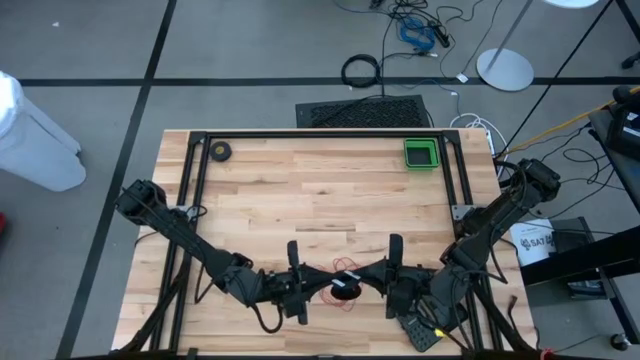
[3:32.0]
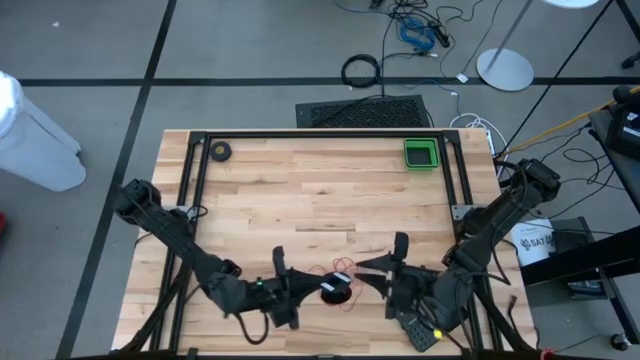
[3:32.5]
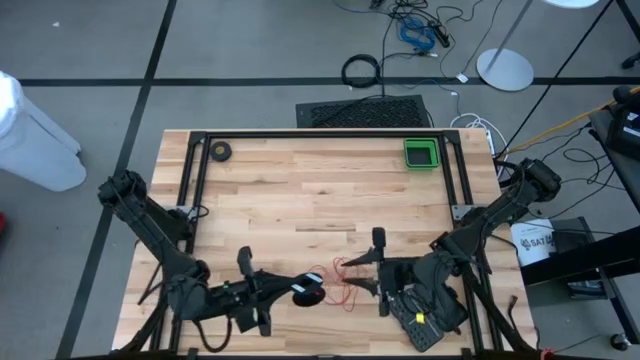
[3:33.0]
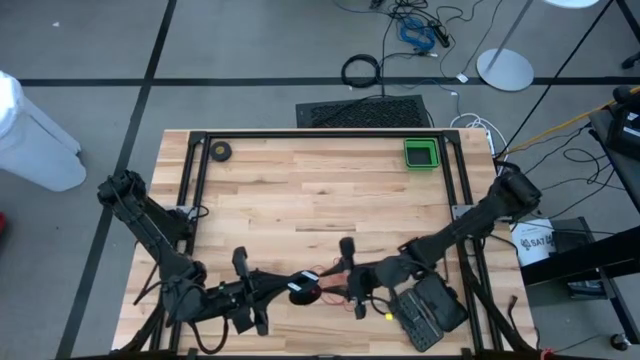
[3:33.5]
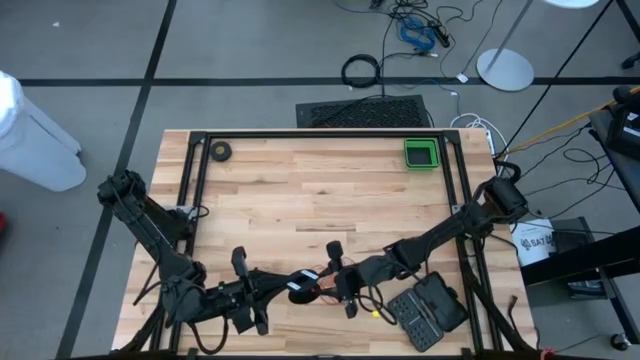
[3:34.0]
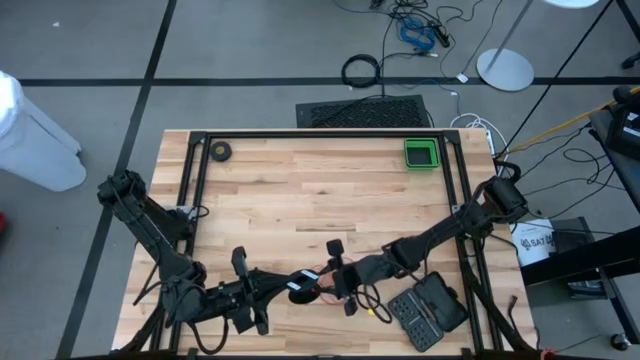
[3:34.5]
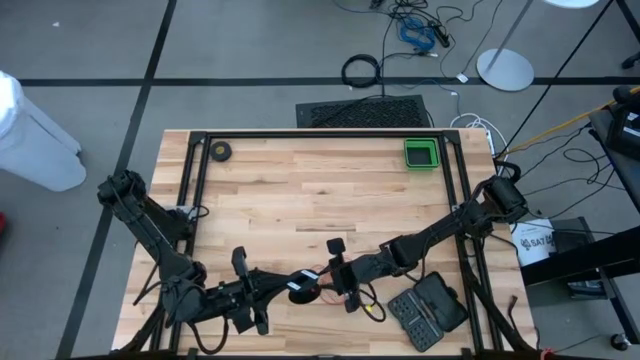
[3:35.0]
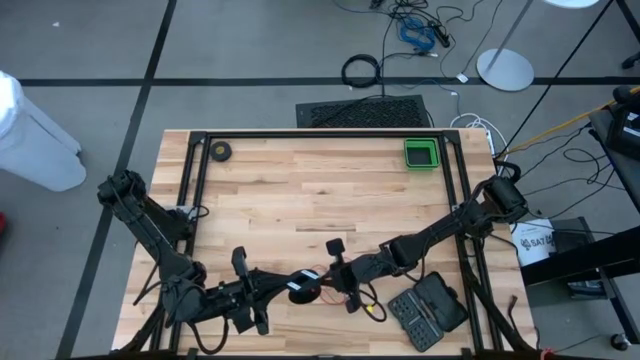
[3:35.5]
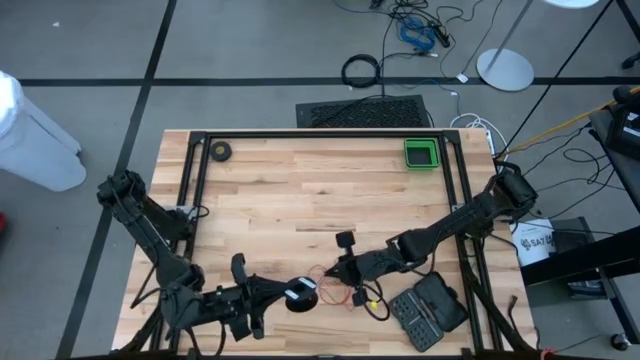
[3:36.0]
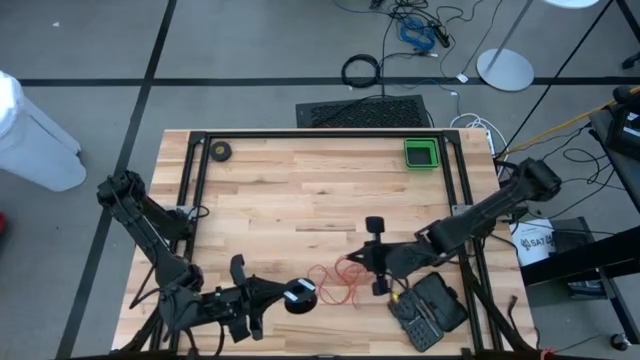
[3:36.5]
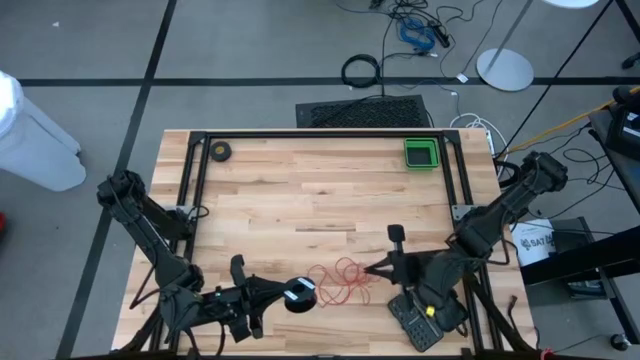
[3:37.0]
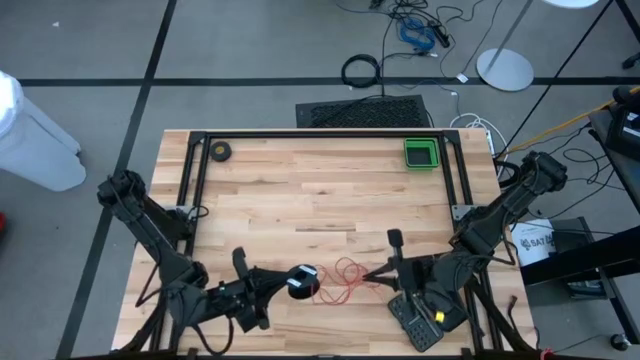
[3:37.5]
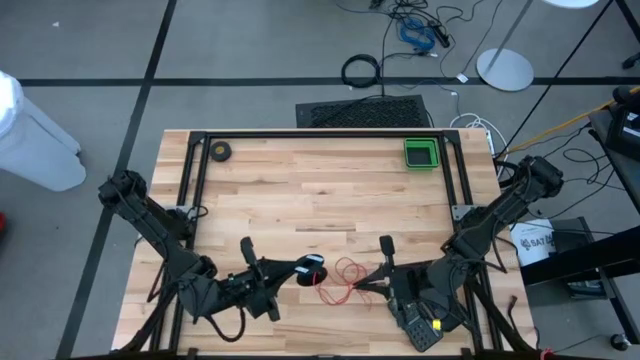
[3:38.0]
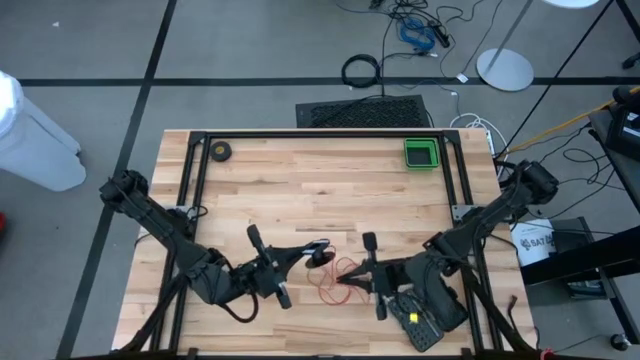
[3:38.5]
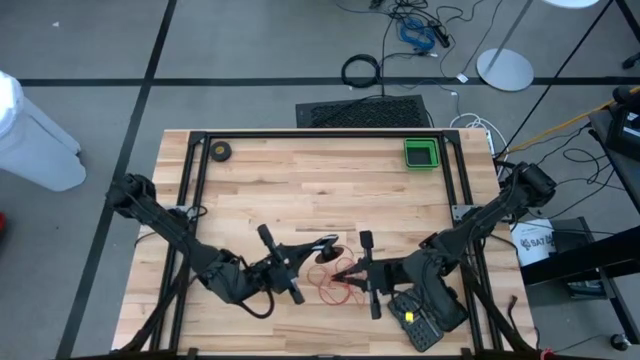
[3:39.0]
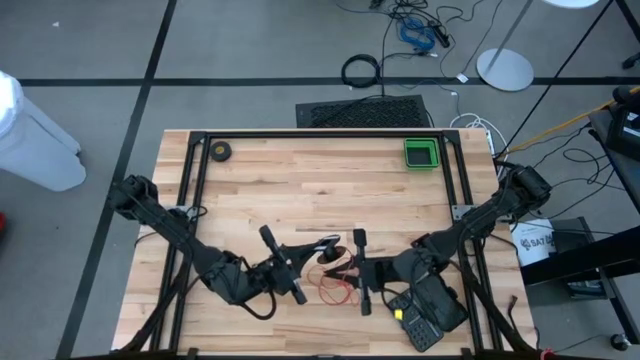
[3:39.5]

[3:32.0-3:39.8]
Task: Coil cords
Coil the red wire into the spool

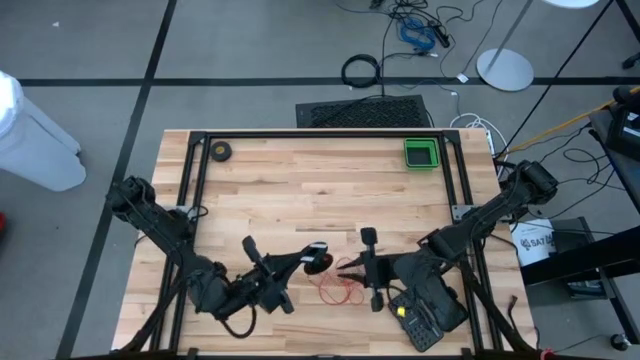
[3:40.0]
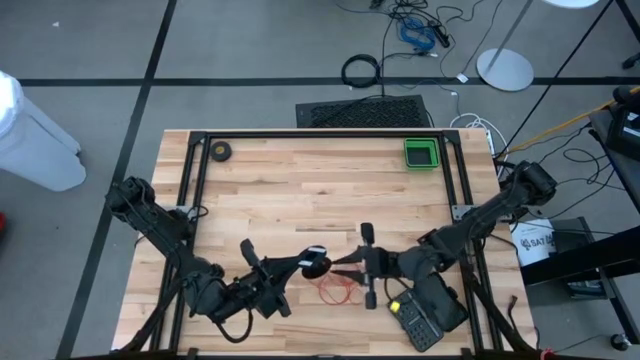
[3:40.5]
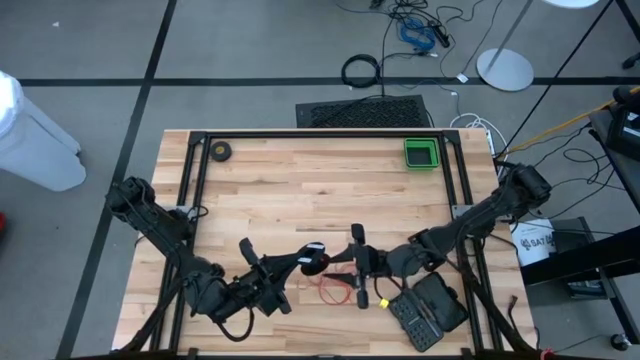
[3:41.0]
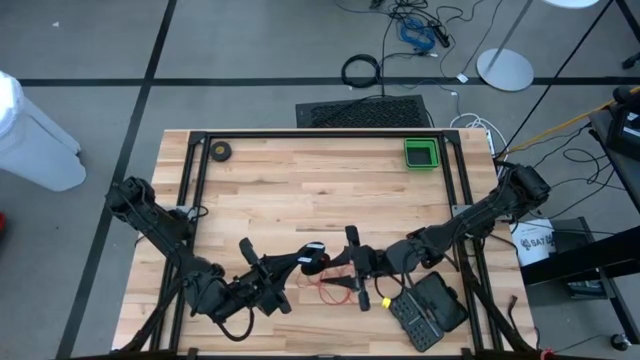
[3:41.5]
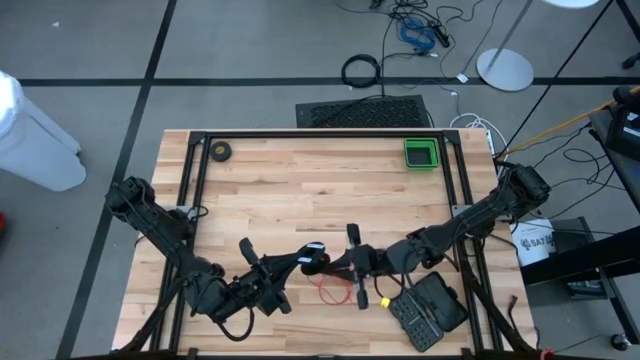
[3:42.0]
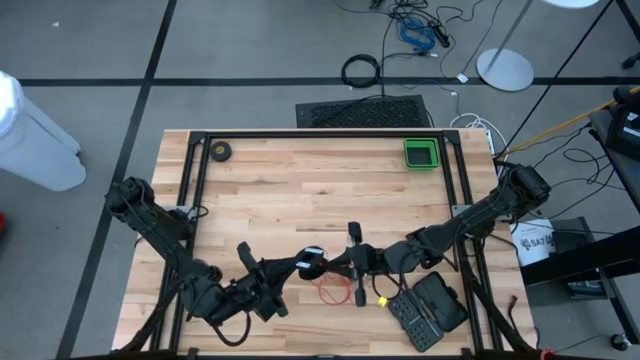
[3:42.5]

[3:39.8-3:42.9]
Coil the red wire into the spool

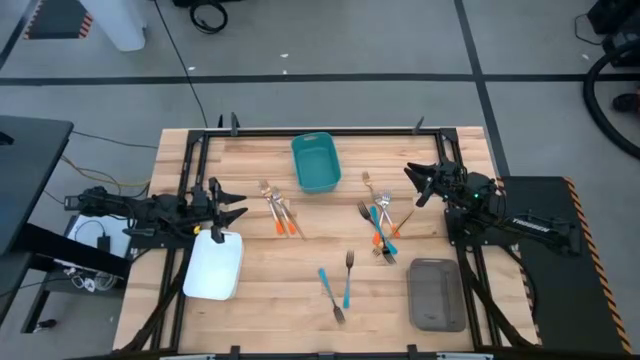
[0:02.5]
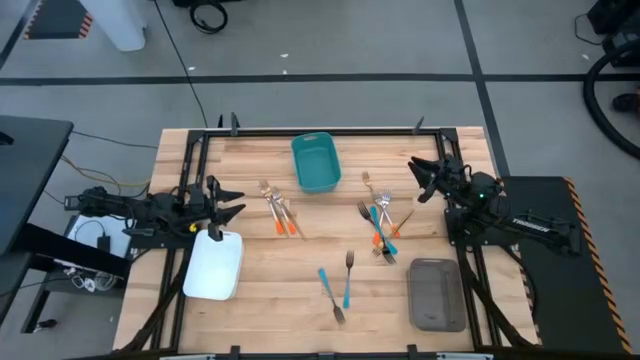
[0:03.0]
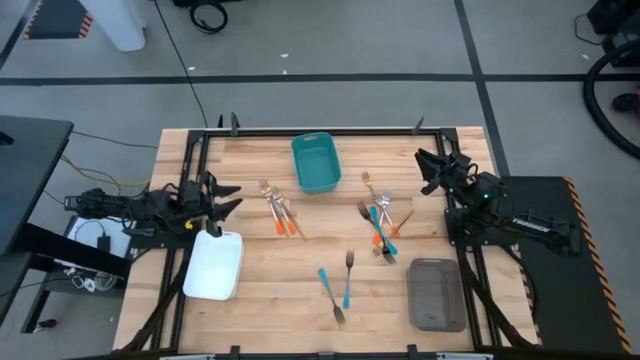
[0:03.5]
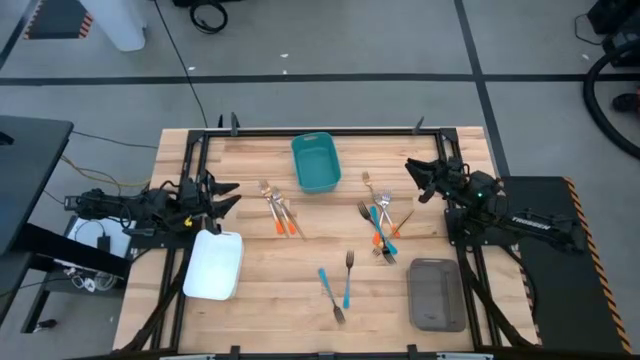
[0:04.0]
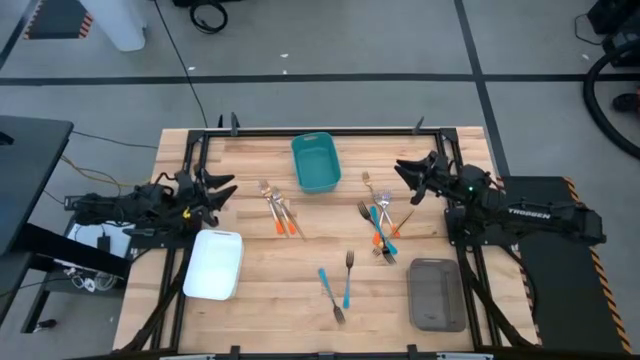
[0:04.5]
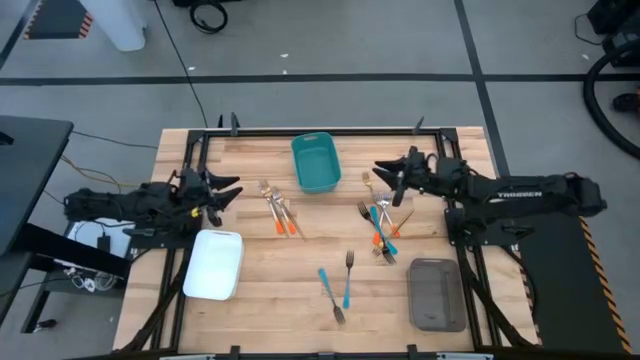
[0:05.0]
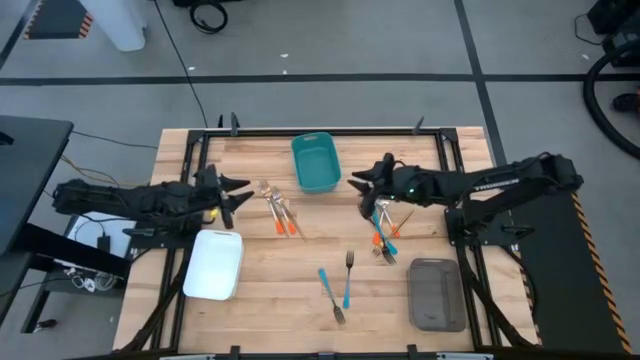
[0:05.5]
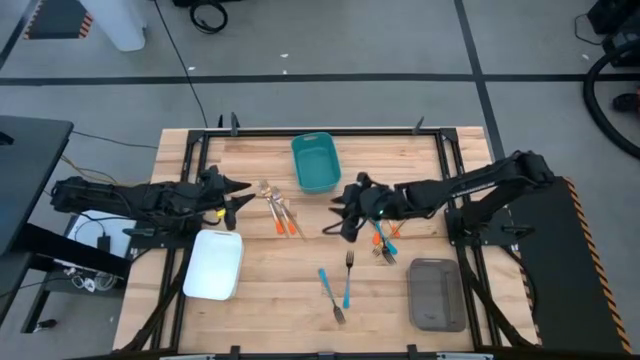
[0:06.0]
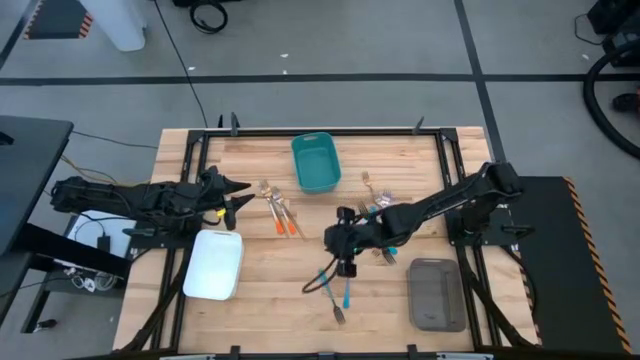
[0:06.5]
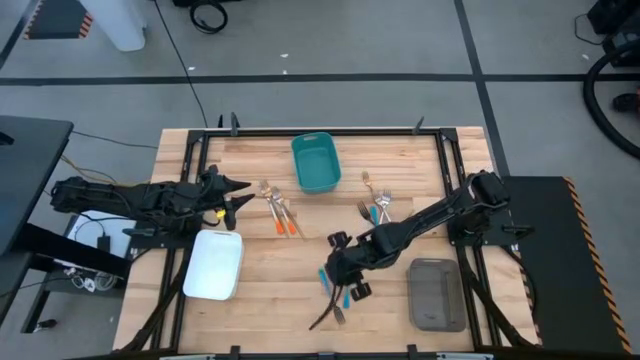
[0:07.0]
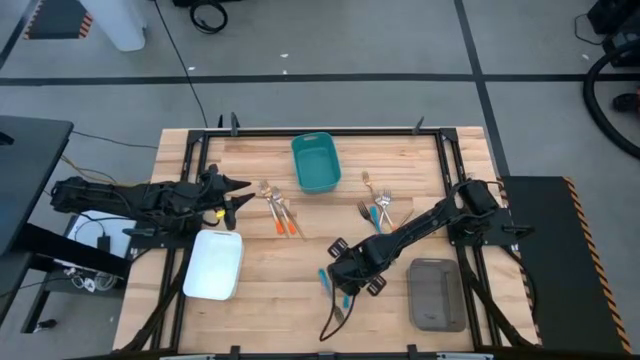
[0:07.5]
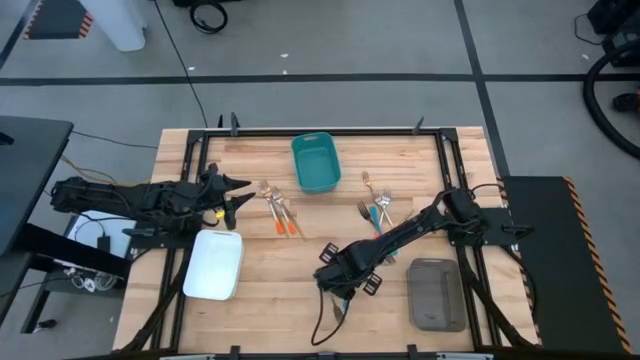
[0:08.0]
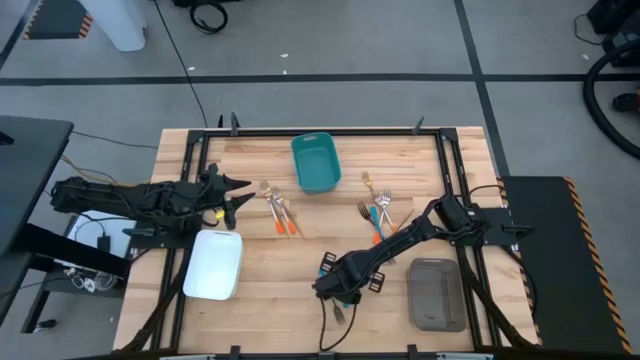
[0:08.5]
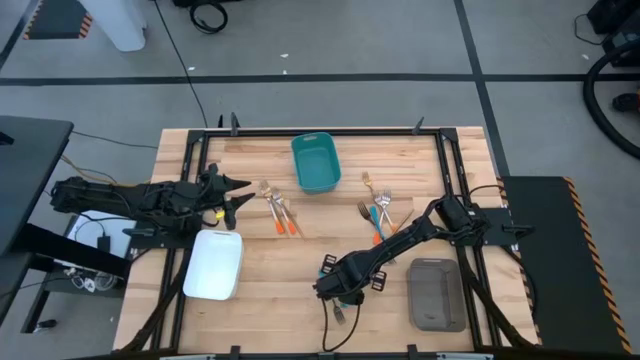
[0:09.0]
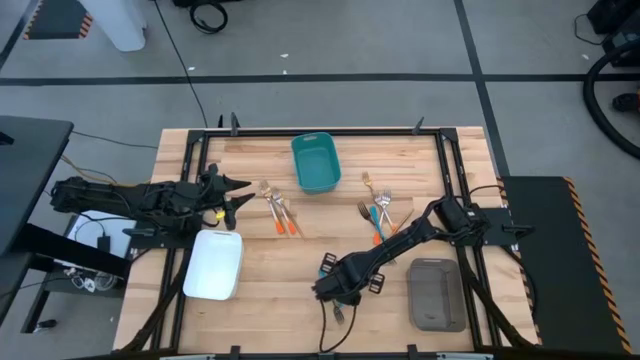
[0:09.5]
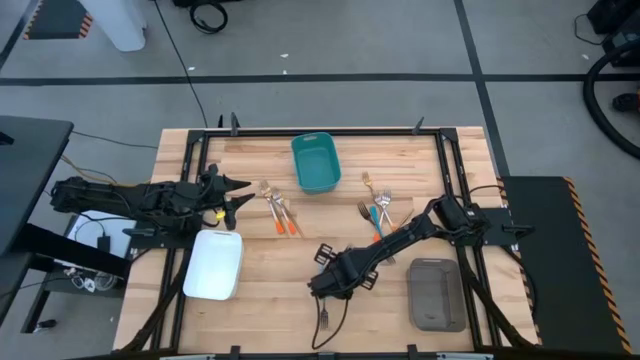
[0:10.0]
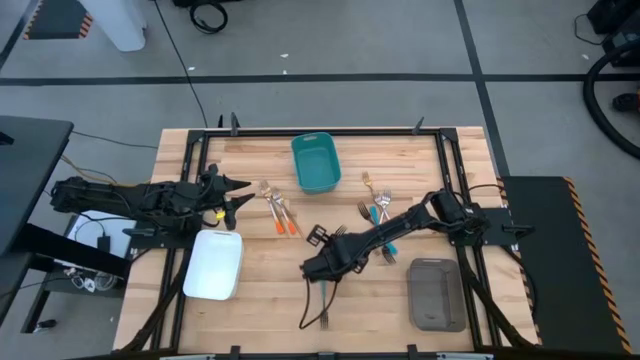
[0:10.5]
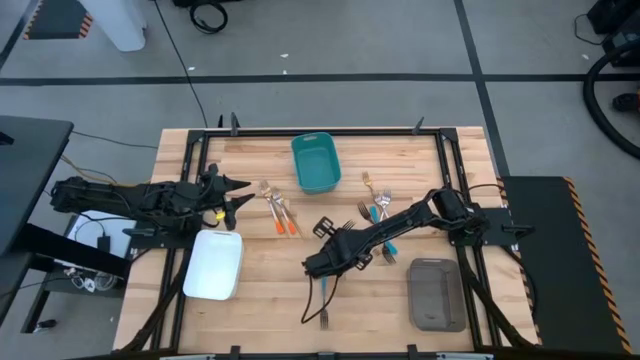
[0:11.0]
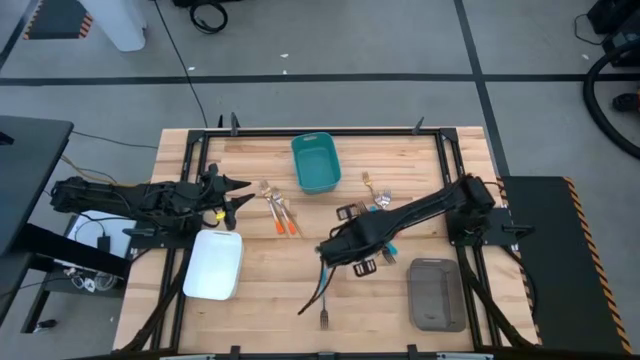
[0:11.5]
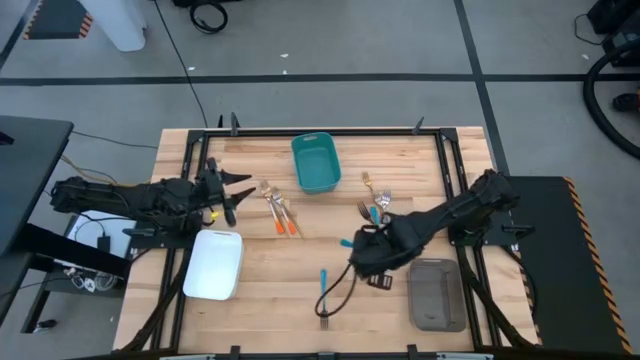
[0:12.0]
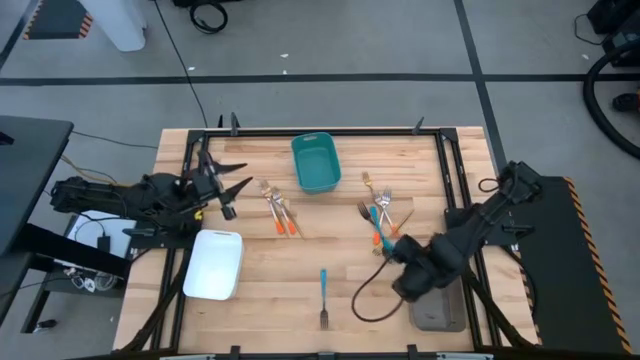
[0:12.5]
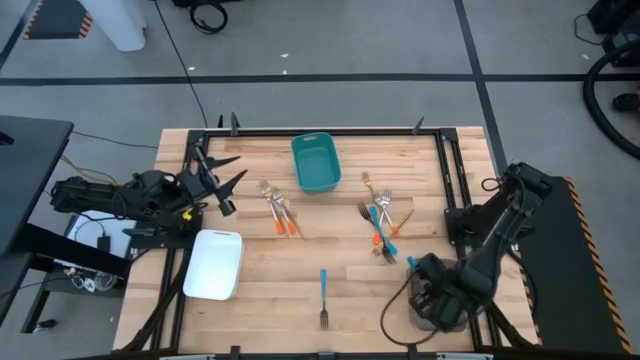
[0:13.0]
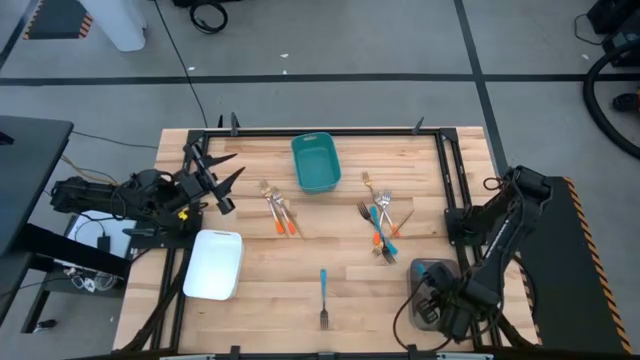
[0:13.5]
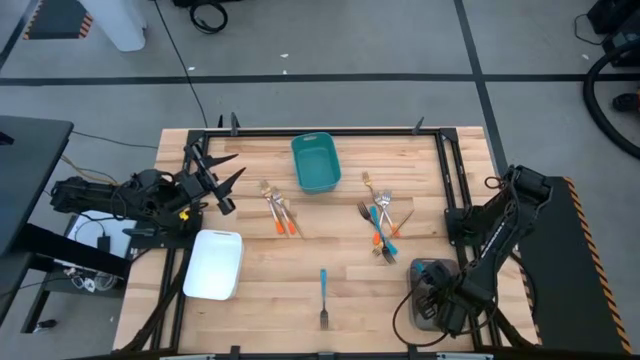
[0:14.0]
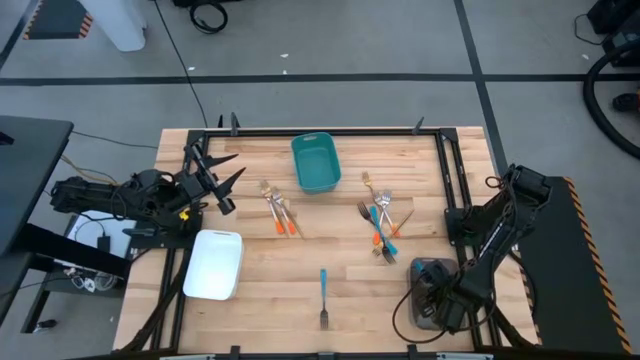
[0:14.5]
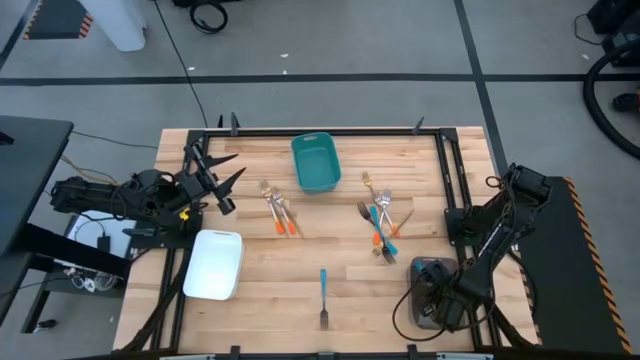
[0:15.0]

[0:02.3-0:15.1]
Task: Sort silverware by color (type)
Put the blue fork into the black bin
